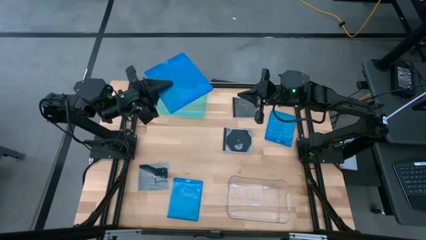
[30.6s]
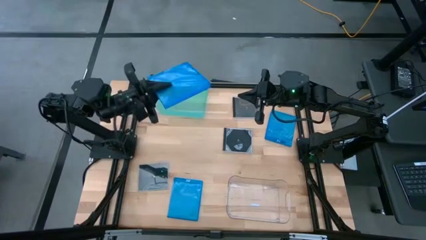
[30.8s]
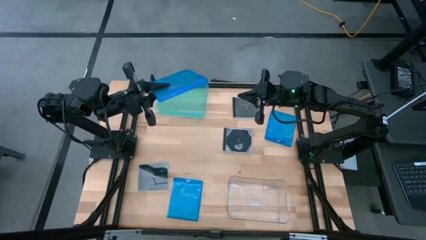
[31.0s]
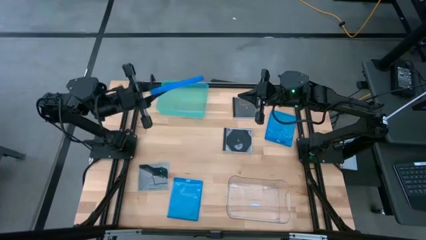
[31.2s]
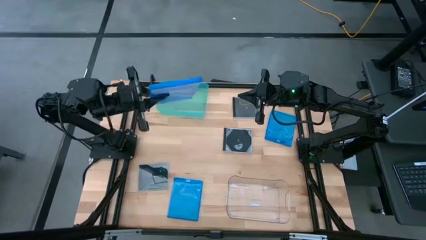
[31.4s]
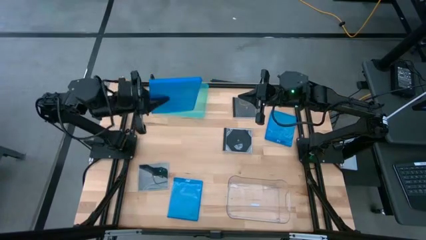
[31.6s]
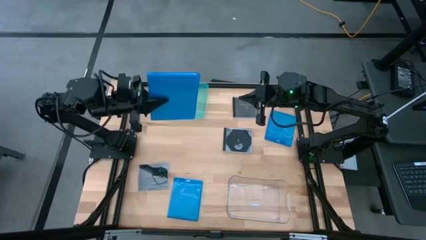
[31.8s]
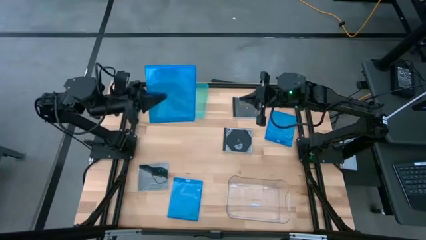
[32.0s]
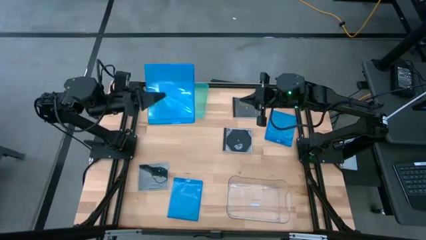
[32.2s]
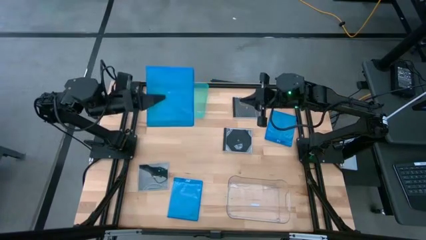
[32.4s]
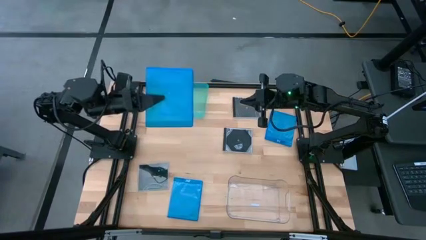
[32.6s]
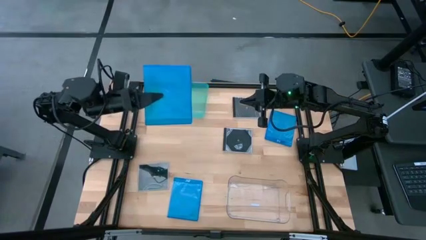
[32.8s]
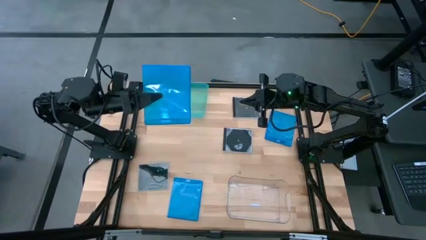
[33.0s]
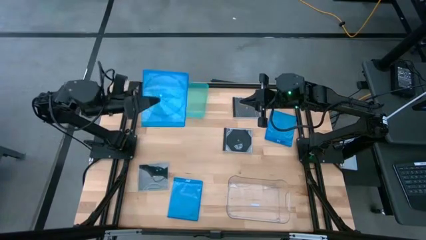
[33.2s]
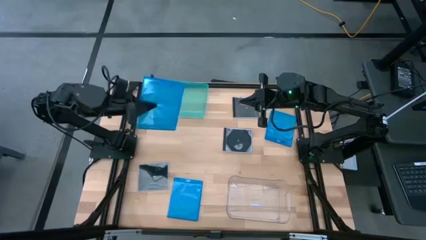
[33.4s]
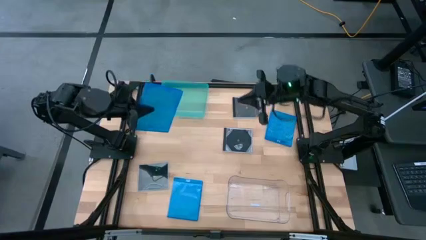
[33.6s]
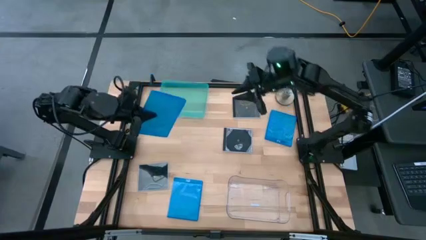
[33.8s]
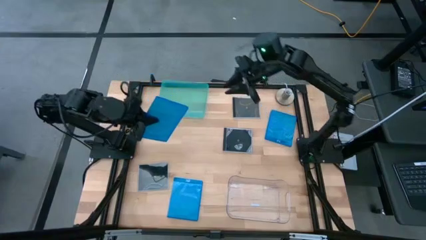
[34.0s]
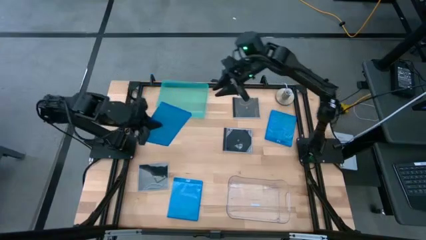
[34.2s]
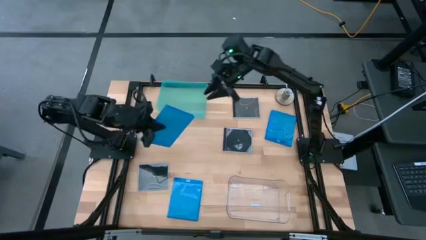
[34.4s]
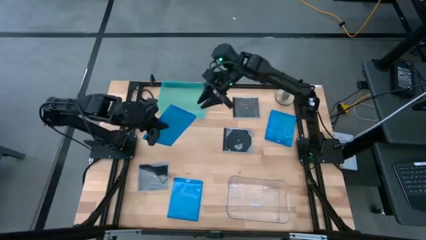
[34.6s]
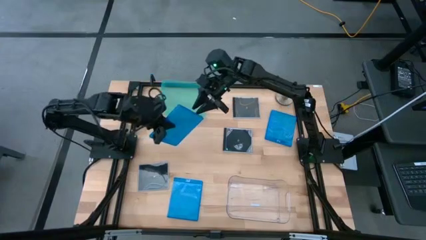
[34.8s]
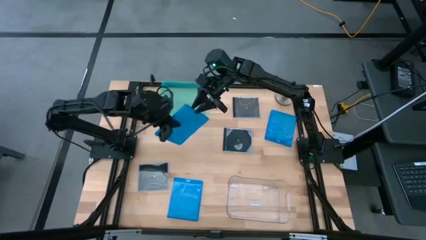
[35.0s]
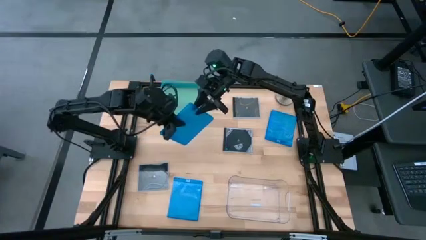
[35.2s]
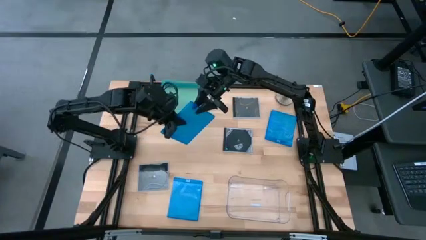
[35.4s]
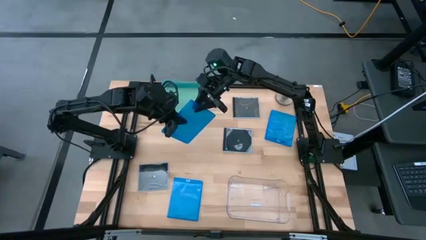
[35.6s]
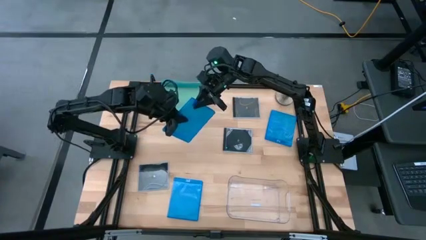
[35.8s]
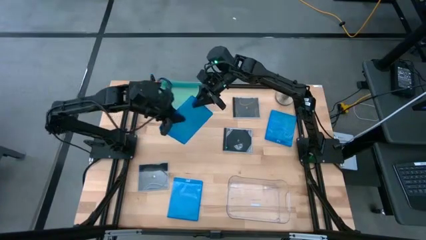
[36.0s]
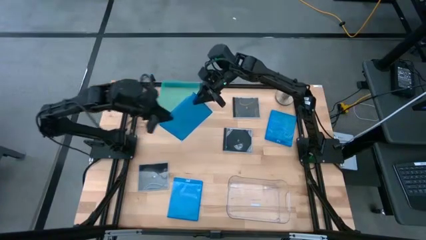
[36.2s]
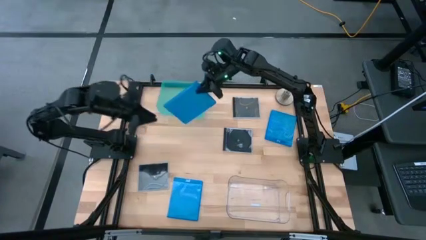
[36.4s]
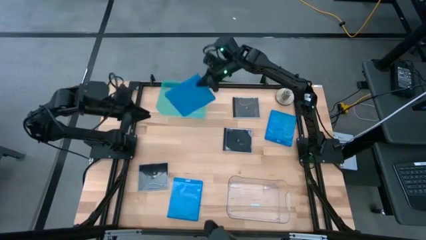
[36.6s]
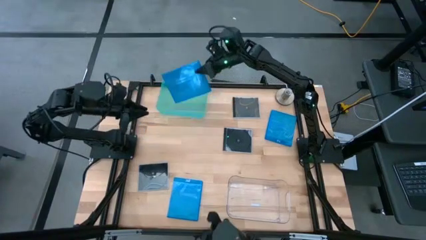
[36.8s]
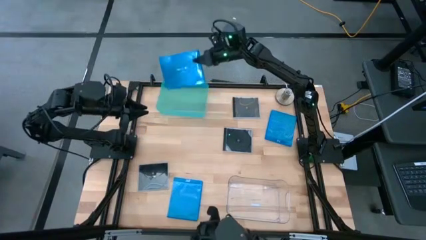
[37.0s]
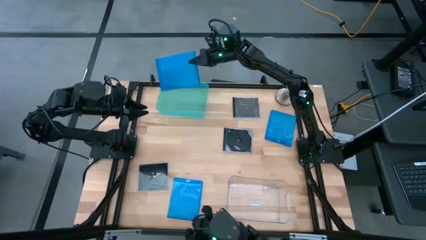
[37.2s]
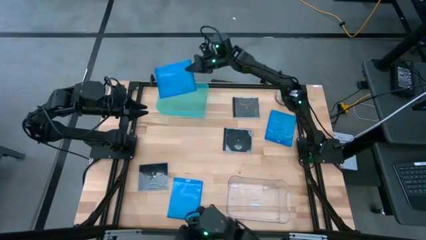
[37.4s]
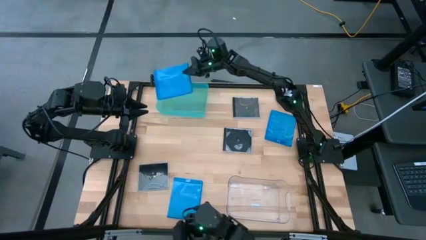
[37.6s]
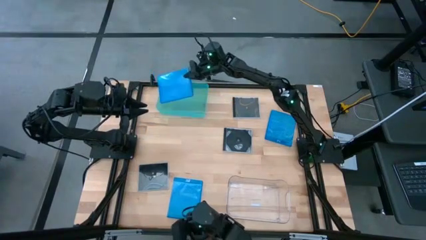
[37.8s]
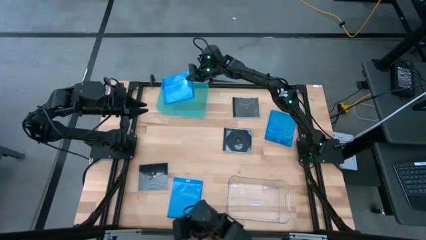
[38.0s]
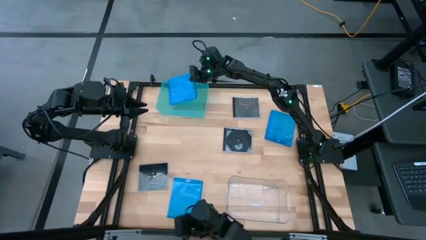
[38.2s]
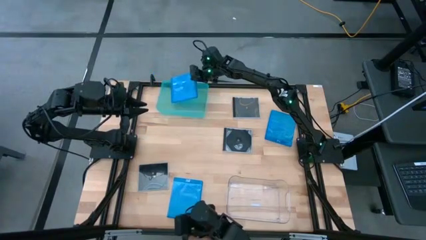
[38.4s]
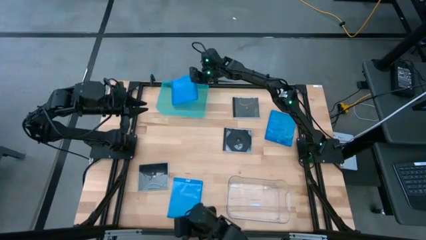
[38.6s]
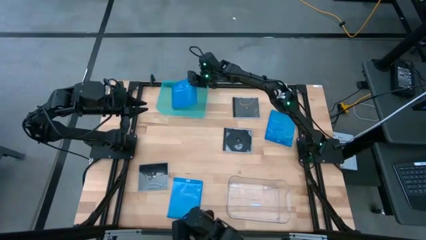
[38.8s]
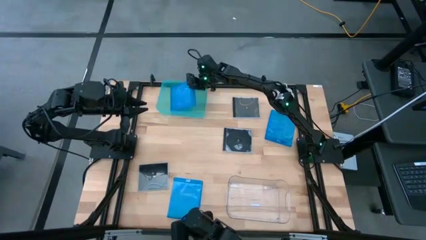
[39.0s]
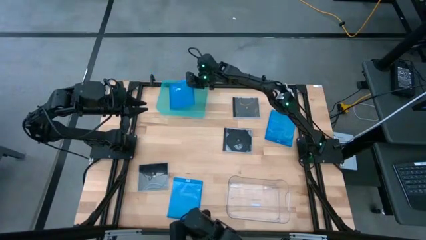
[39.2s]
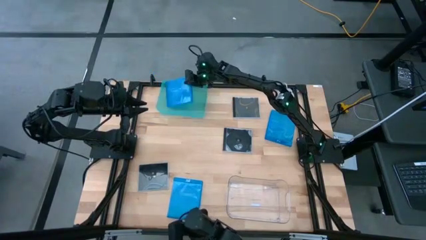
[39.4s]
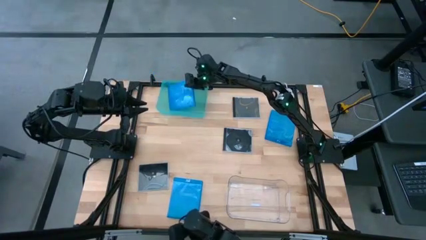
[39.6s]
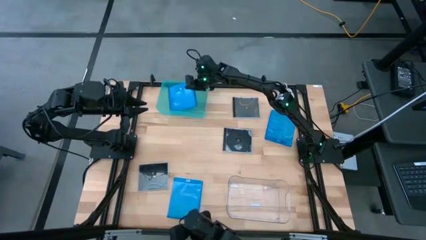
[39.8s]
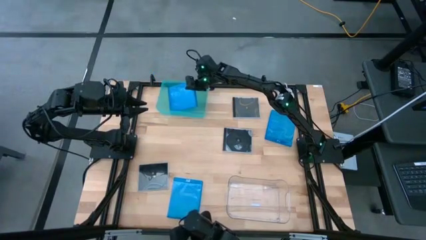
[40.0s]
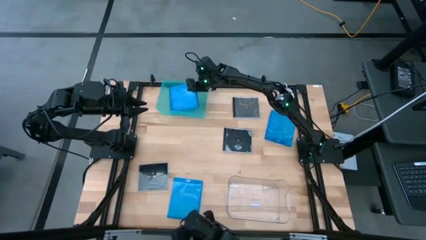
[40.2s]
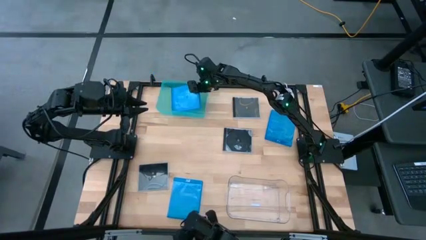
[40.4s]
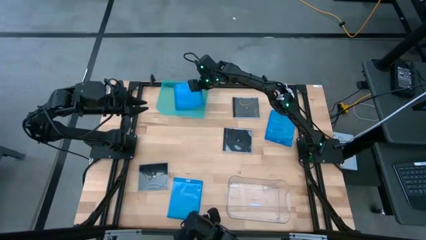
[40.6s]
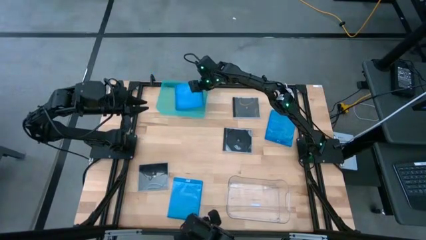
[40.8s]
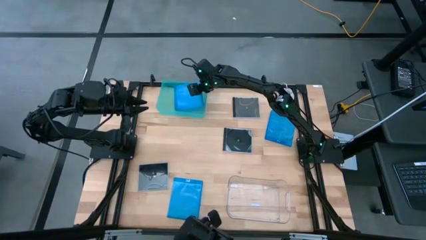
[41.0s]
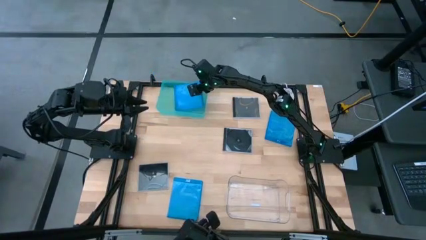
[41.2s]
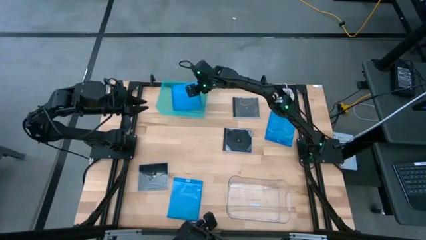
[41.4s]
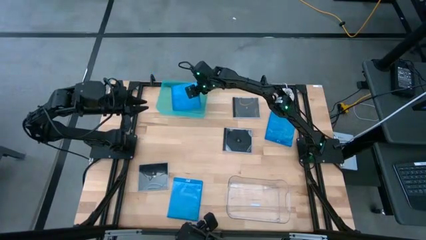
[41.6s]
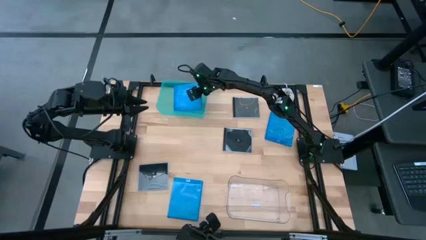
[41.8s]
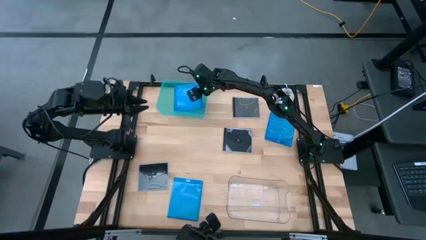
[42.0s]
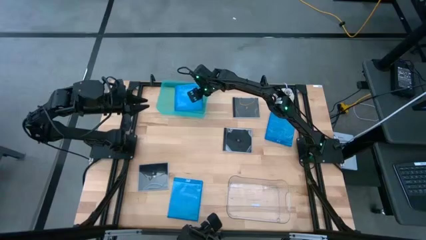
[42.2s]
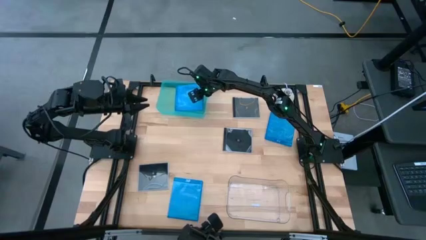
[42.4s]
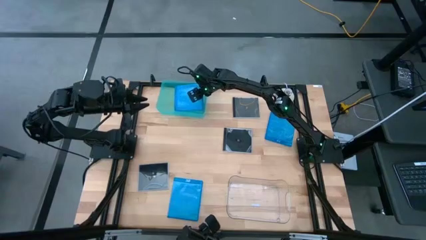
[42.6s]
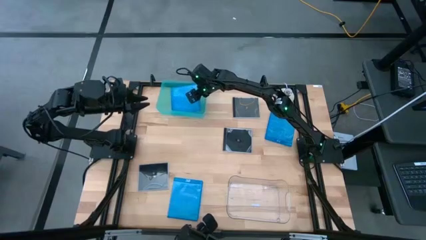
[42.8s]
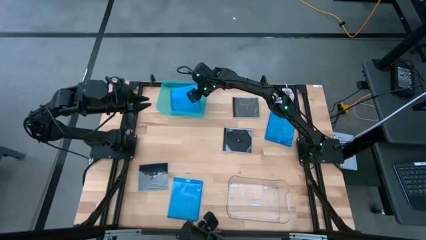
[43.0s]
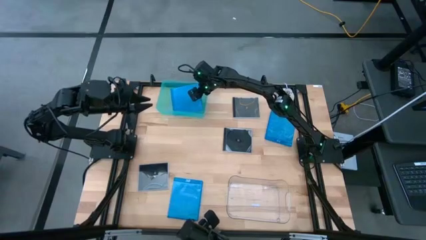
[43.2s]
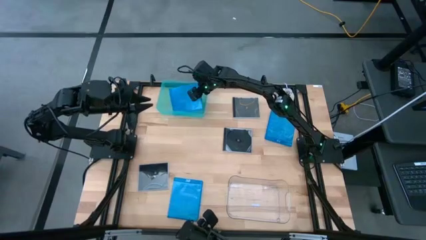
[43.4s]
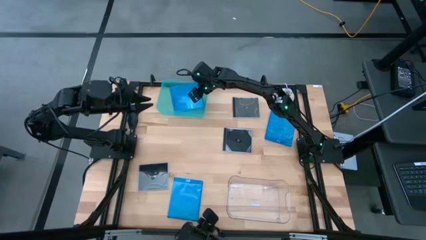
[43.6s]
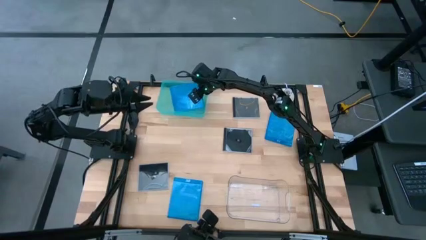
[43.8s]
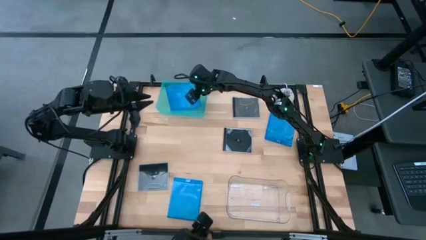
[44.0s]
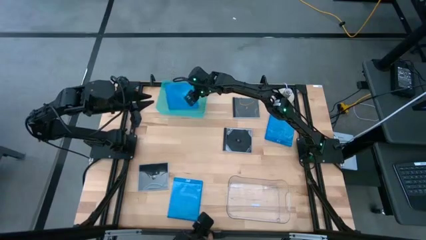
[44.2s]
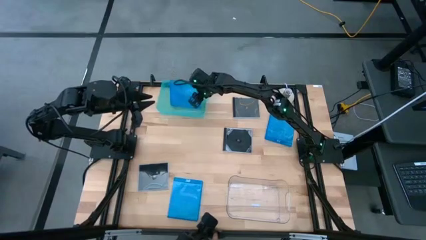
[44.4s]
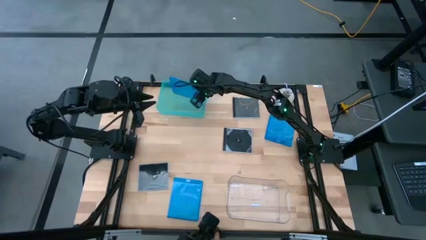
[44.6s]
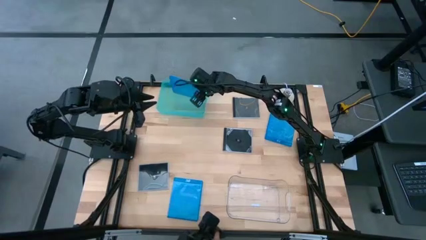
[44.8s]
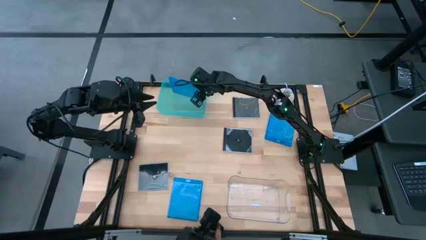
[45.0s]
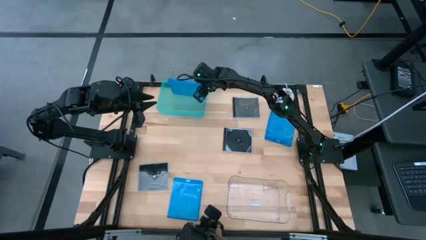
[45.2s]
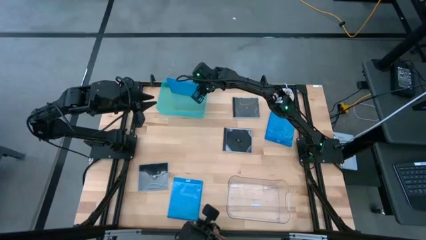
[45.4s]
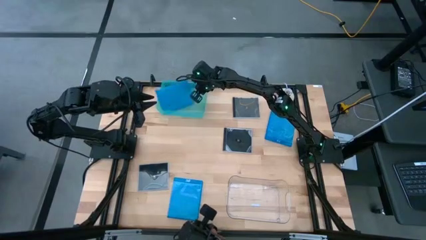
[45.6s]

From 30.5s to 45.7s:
Task: Pick & place jewel cases by type
Put the top left dark blue CD case into the light blue bin
